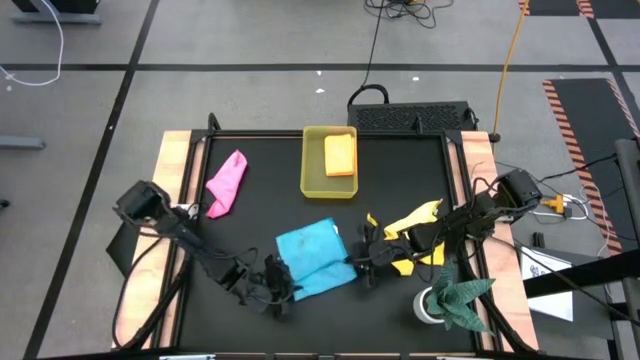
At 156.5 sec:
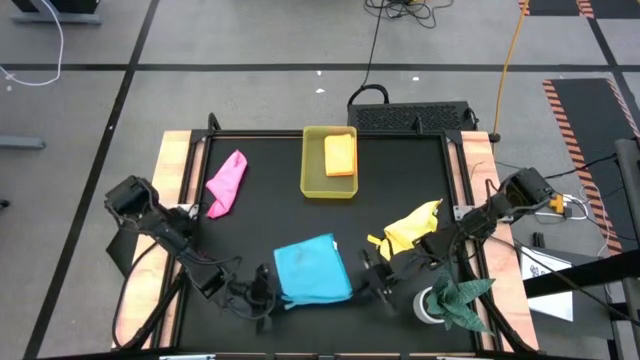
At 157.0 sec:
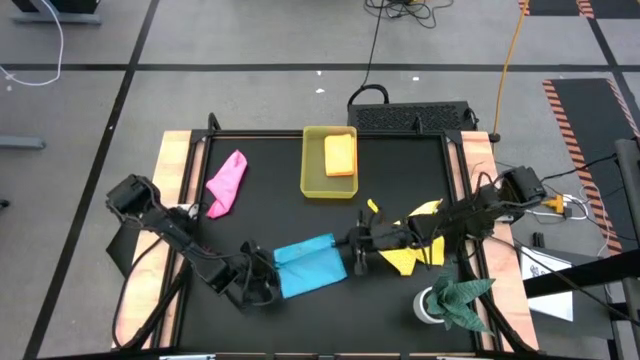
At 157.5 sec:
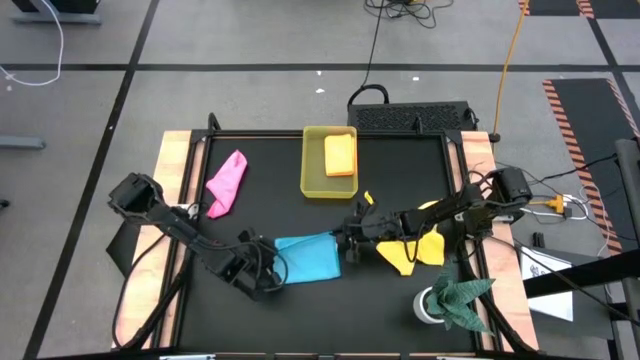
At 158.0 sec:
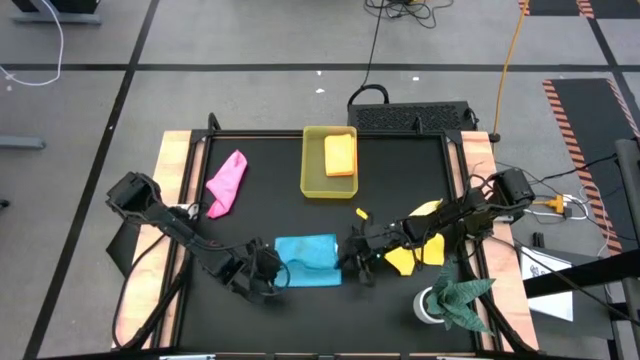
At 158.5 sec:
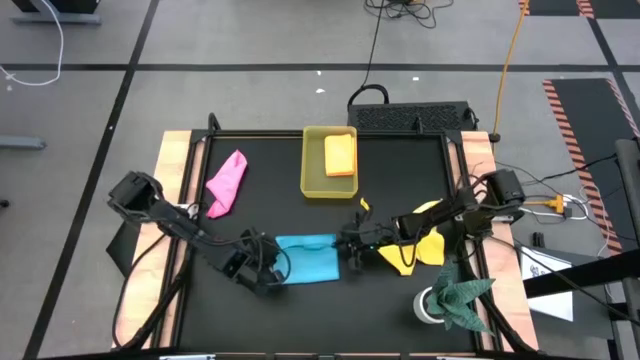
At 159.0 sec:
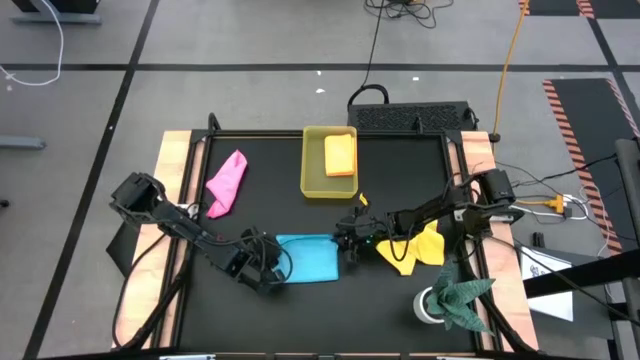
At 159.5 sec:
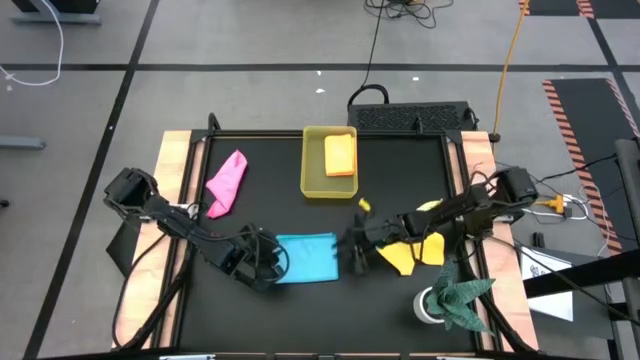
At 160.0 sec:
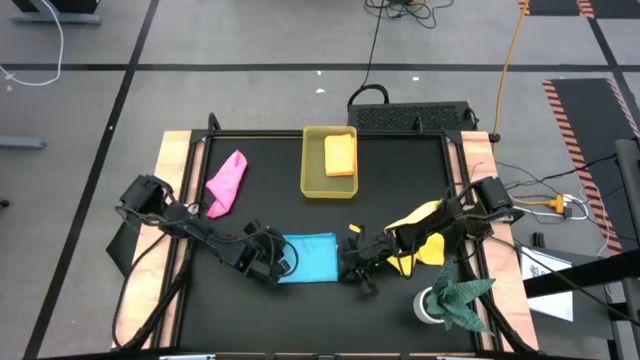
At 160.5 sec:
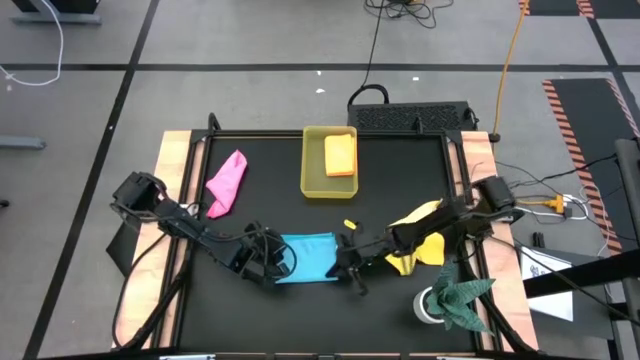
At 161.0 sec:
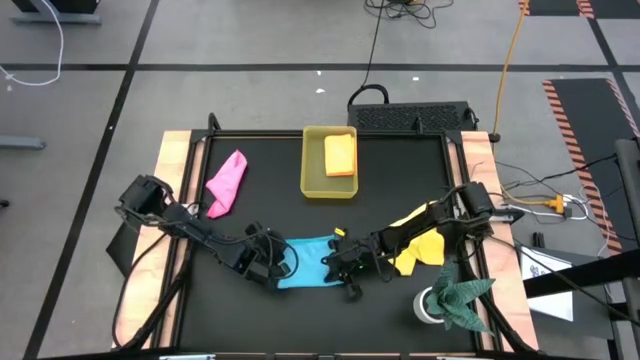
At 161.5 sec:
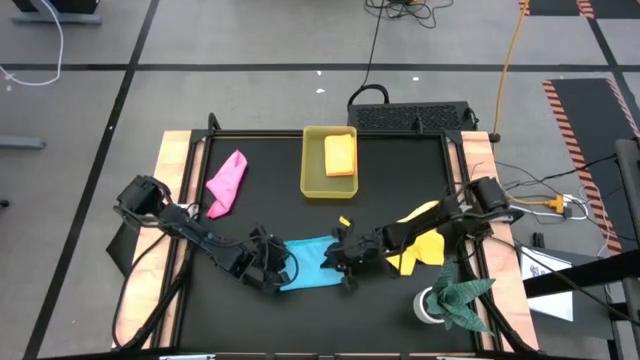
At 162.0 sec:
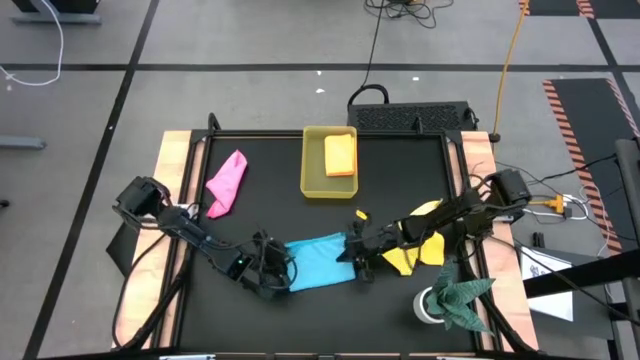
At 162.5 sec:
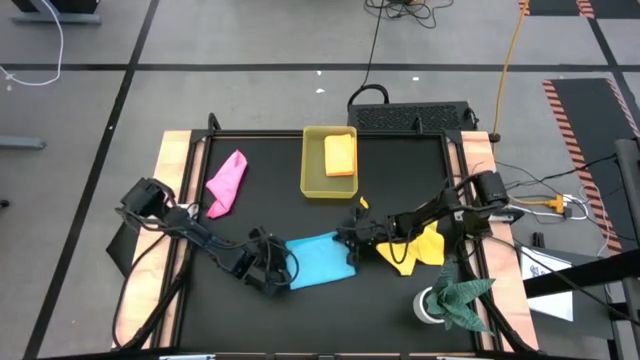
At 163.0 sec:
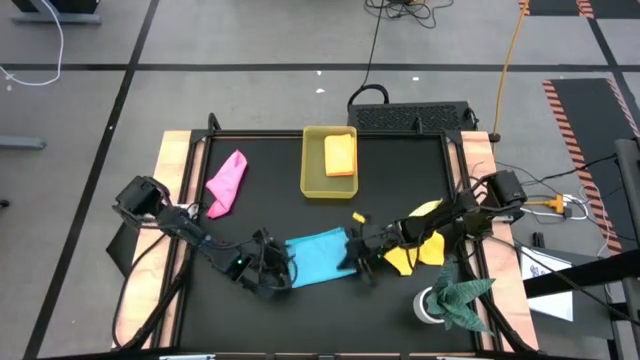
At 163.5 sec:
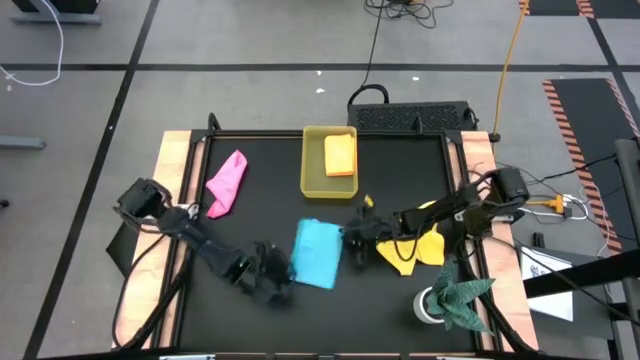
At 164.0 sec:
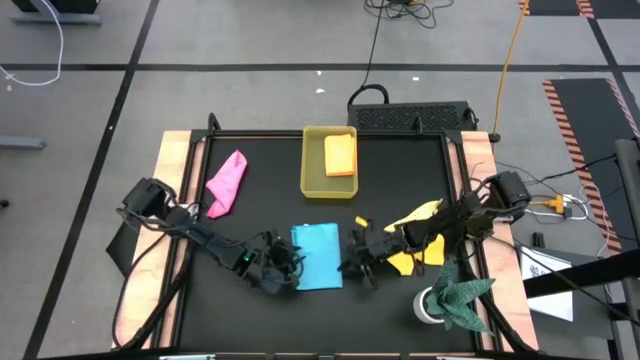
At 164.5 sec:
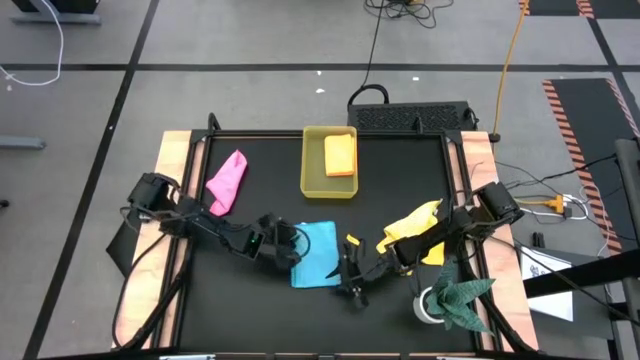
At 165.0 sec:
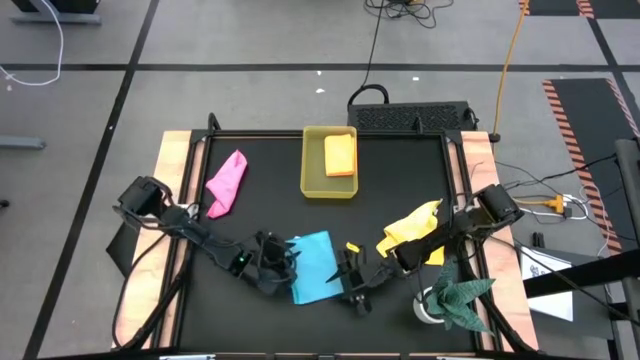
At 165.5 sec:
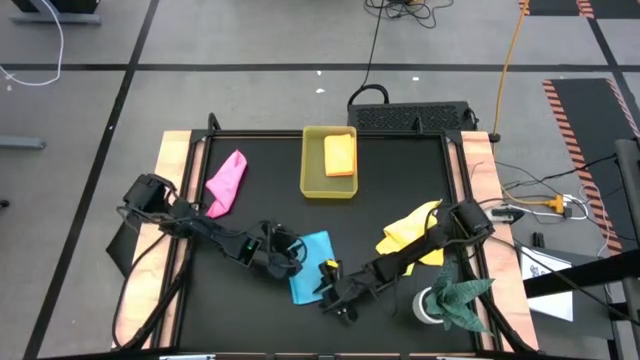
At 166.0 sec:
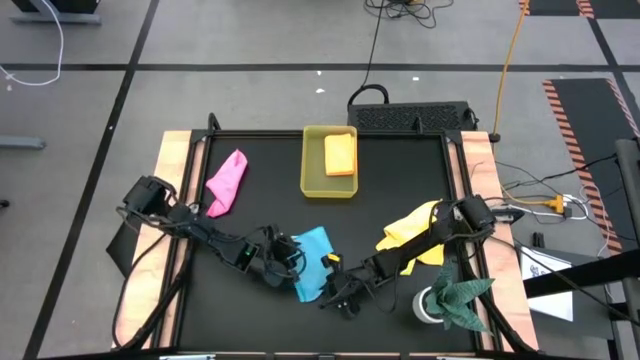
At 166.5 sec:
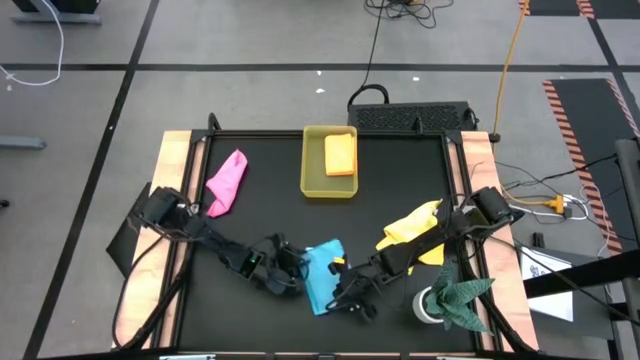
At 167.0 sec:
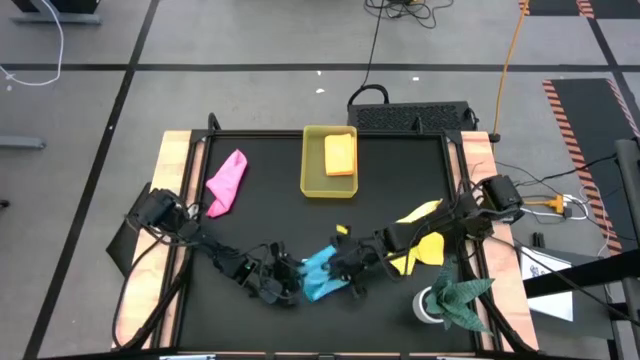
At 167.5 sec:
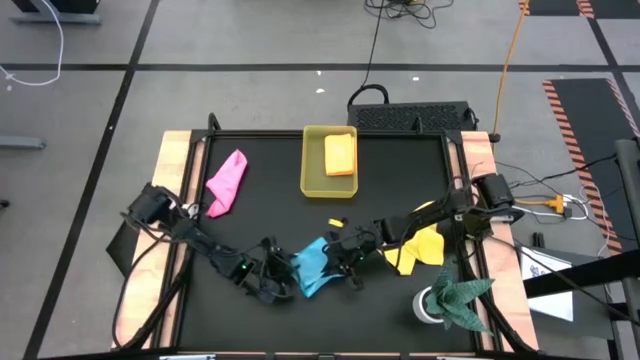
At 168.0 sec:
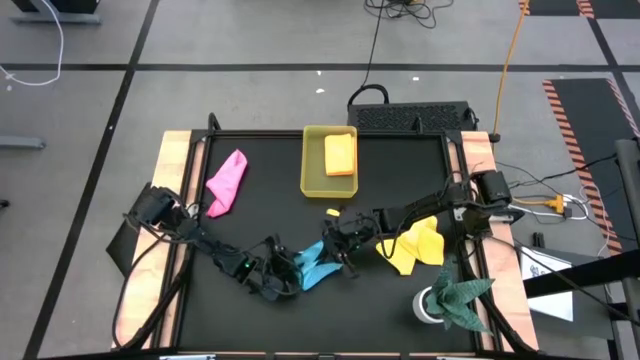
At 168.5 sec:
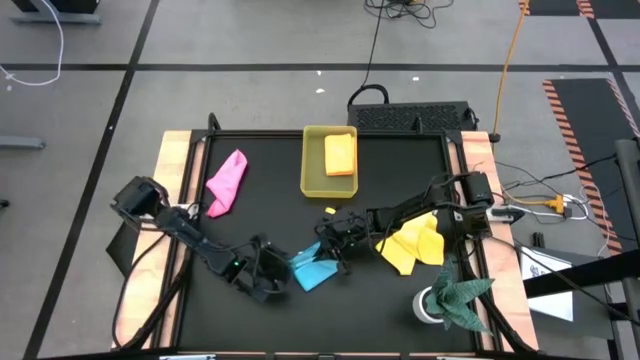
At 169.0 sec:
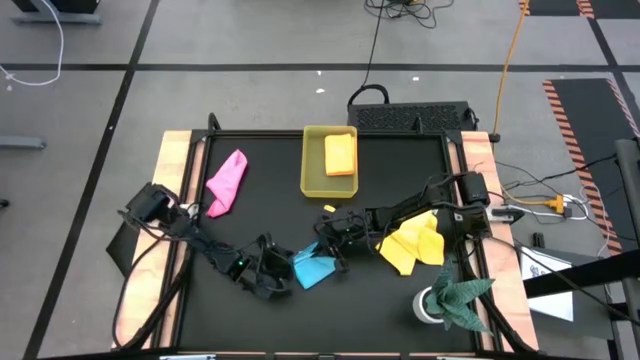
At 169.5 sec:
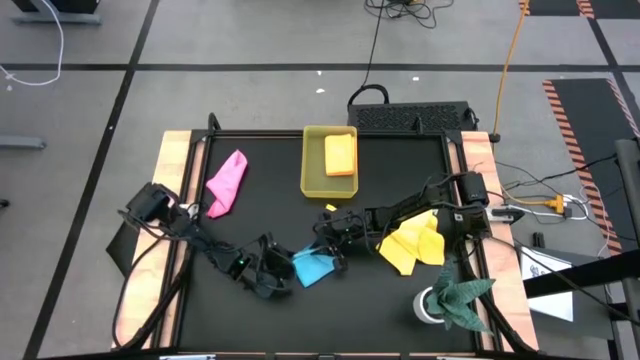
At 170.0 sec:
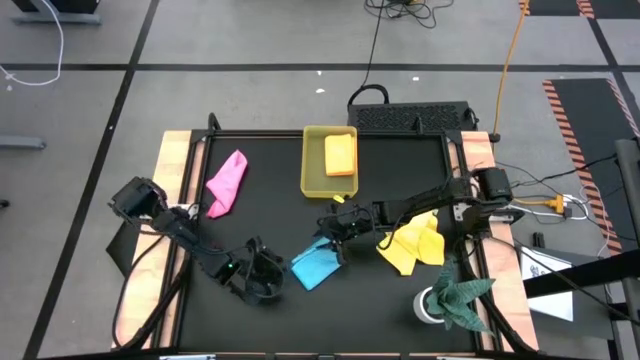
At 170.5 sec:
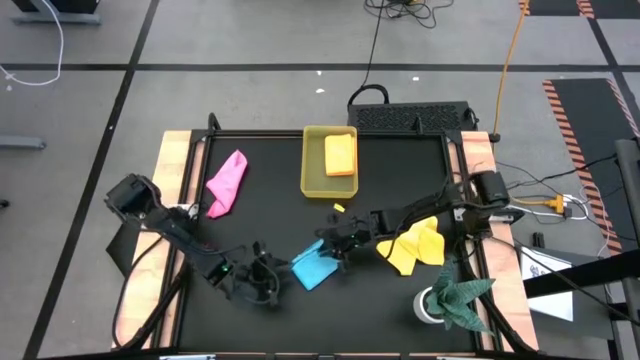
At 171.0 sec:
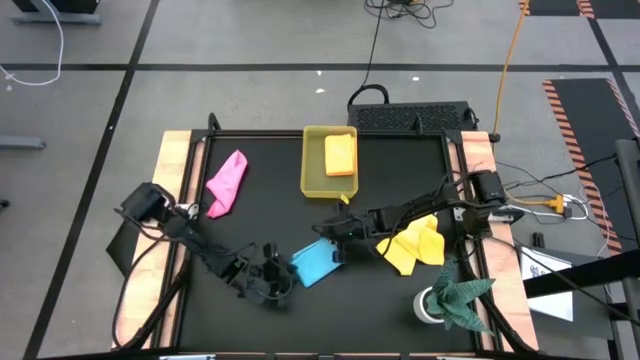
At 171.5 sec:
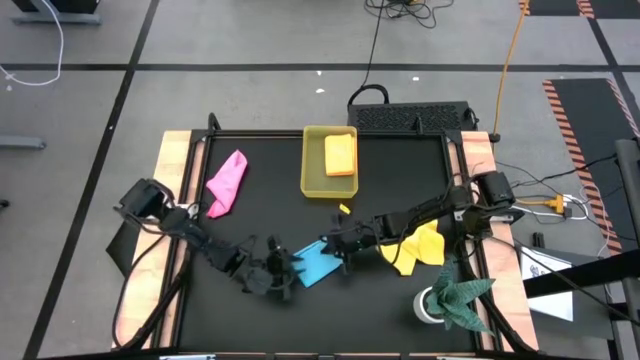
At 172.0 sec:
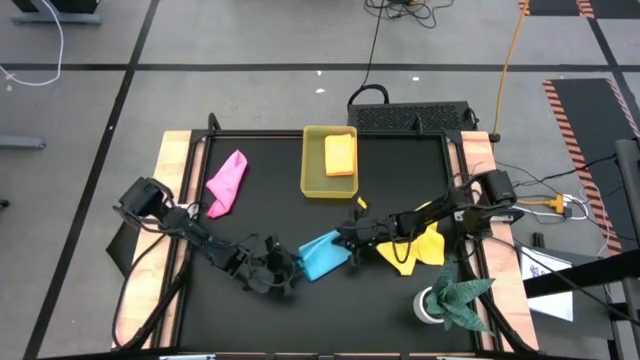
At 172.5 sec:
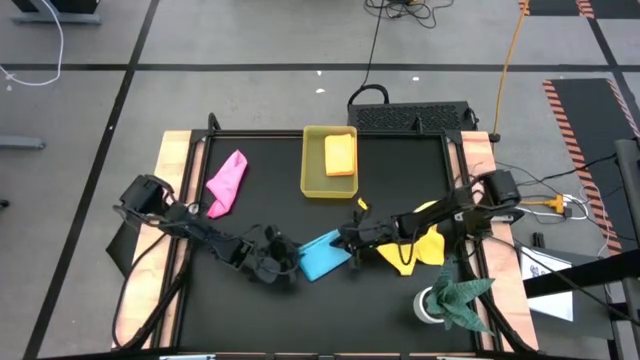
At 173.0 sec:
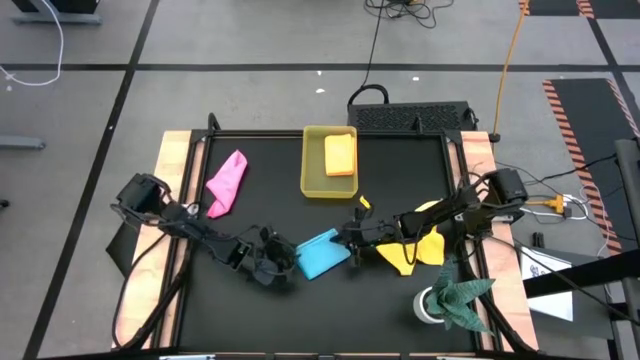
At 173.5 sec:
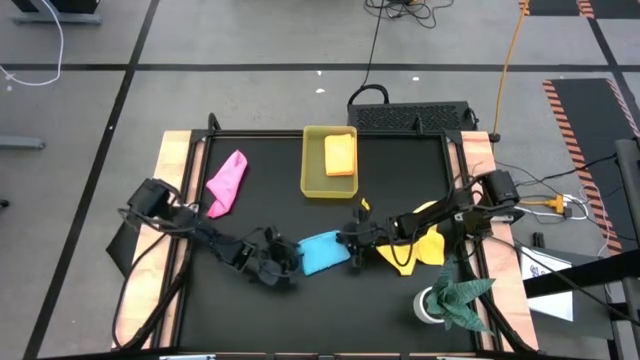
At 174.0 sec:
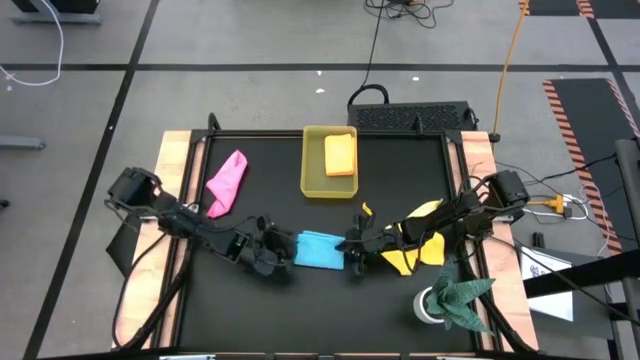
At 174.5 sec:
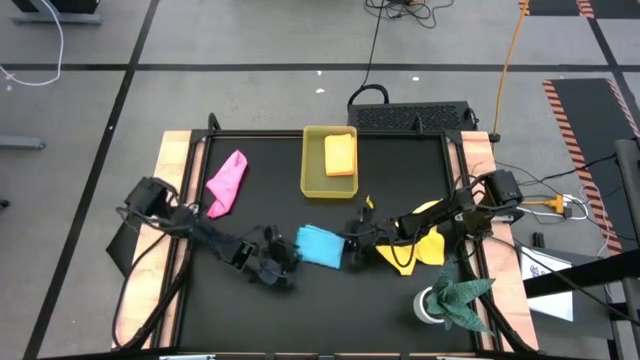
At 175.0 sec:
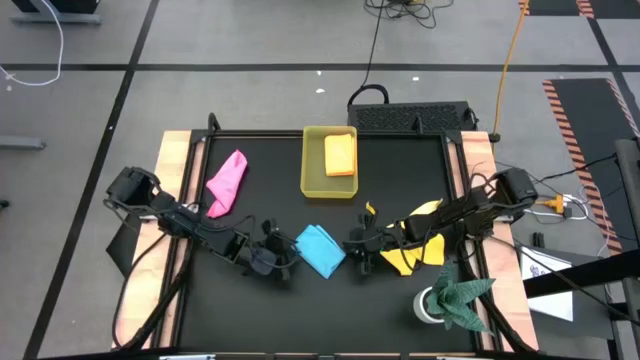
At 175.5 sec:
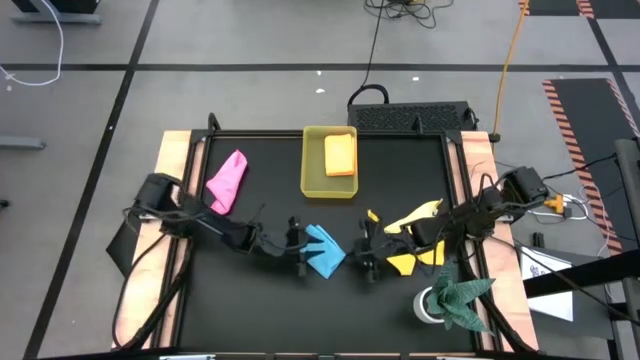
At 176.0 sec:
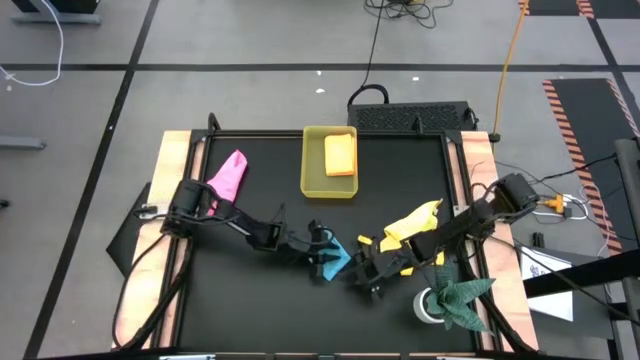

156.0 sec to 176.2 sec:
Task: Fold microfiber towels
Fold the blue towel
